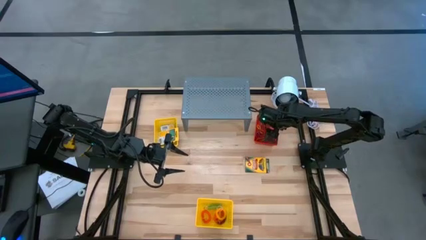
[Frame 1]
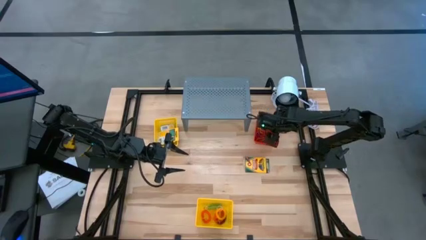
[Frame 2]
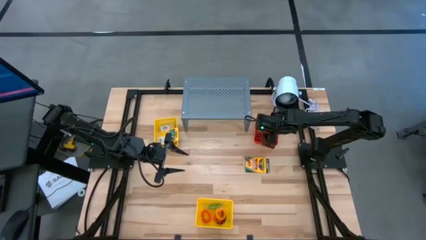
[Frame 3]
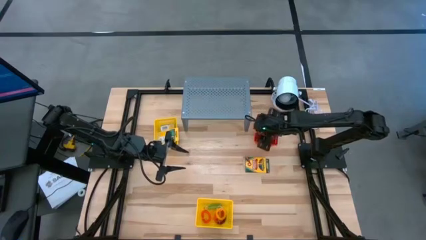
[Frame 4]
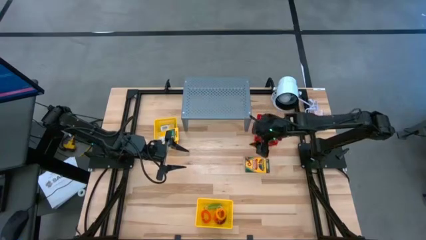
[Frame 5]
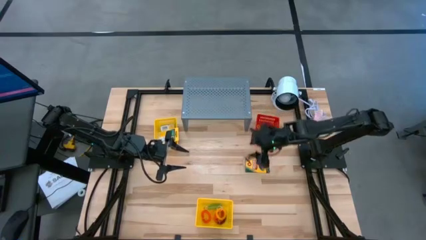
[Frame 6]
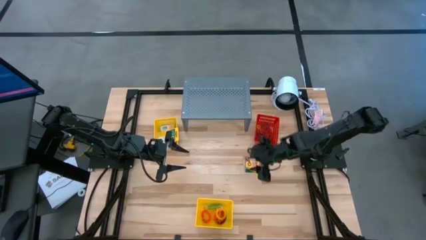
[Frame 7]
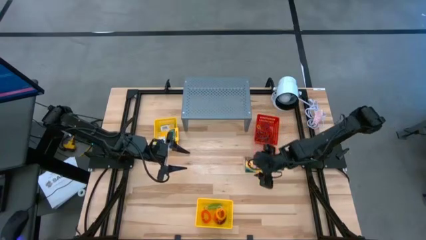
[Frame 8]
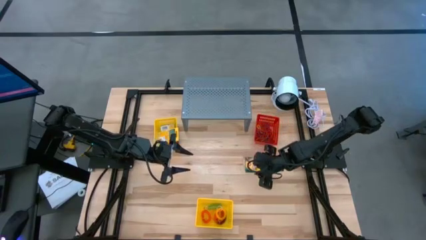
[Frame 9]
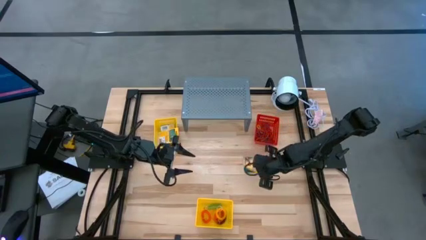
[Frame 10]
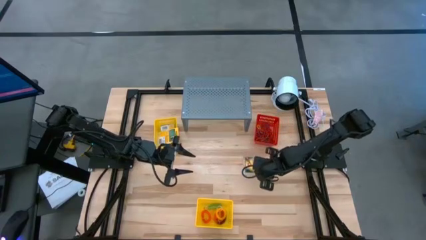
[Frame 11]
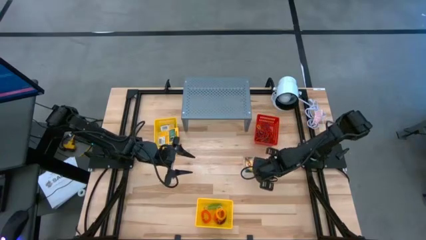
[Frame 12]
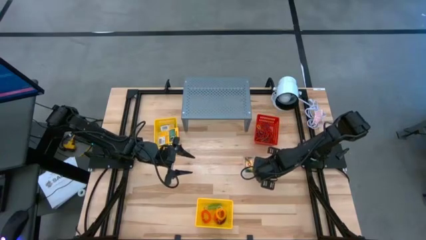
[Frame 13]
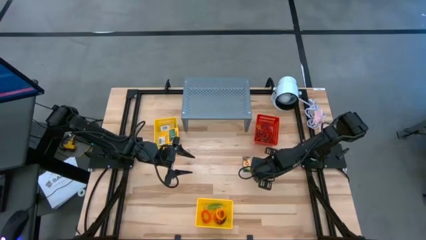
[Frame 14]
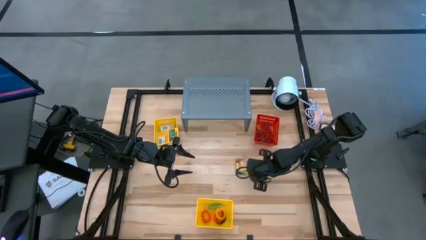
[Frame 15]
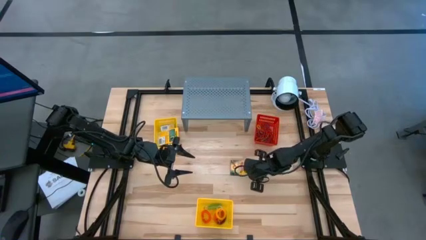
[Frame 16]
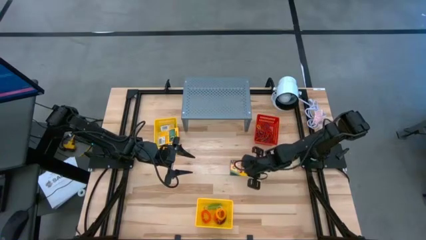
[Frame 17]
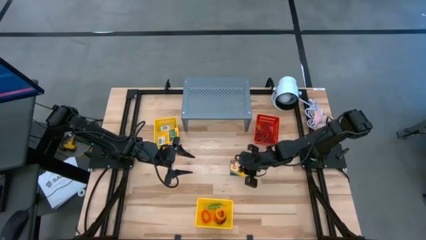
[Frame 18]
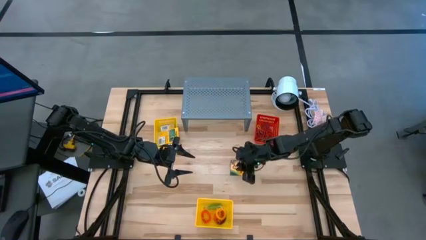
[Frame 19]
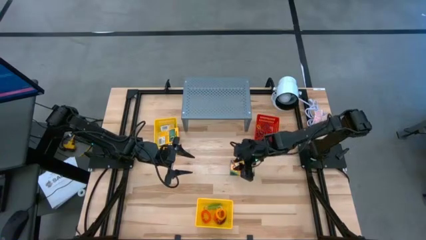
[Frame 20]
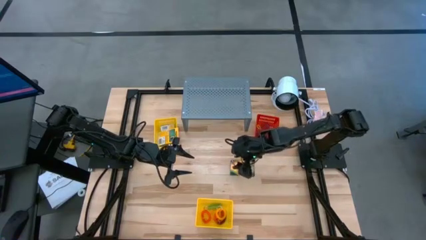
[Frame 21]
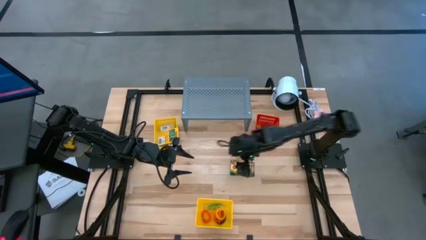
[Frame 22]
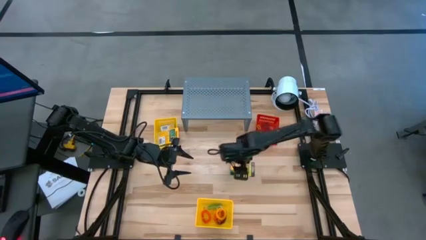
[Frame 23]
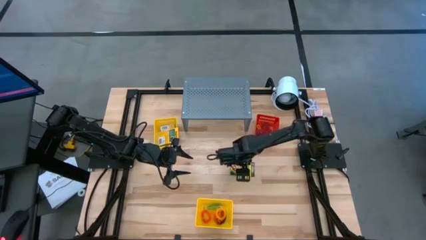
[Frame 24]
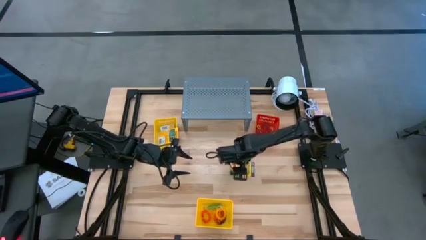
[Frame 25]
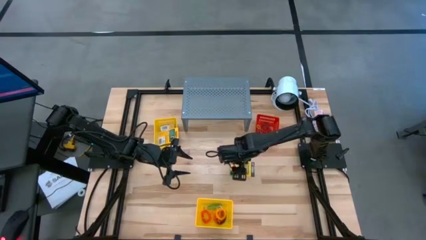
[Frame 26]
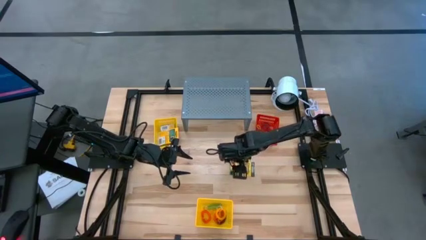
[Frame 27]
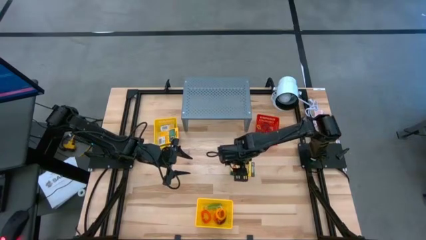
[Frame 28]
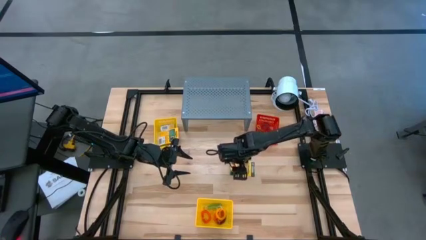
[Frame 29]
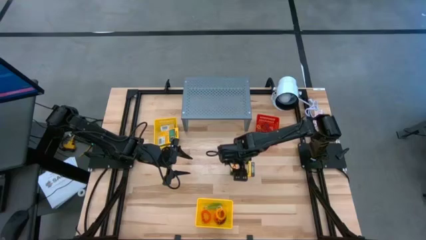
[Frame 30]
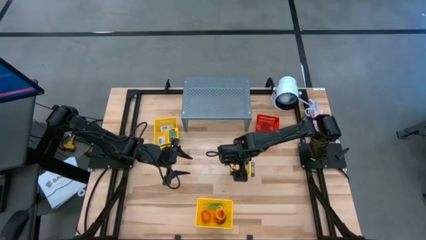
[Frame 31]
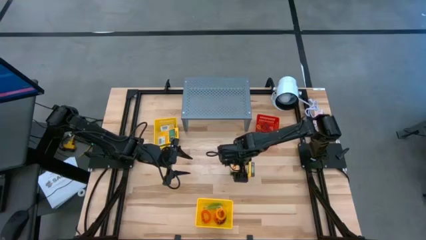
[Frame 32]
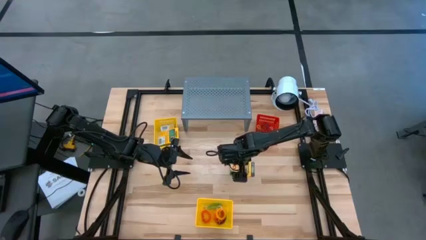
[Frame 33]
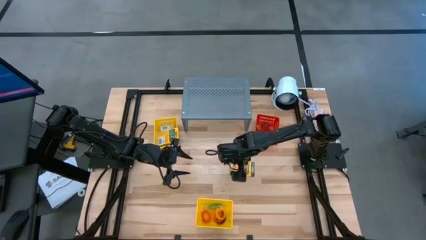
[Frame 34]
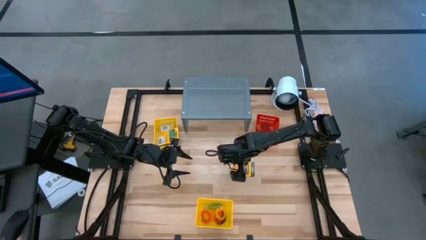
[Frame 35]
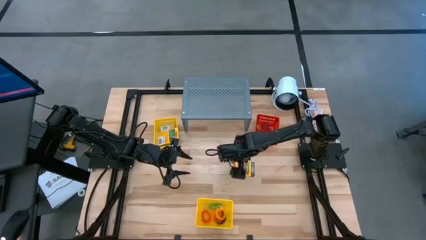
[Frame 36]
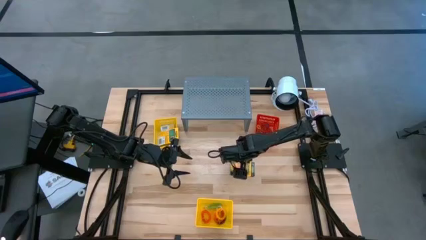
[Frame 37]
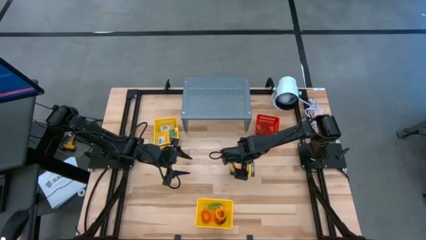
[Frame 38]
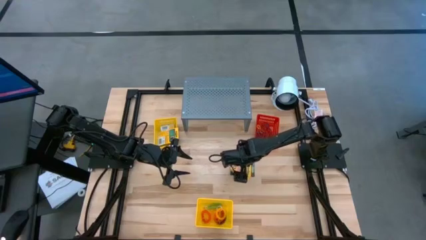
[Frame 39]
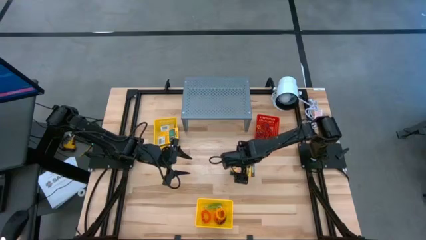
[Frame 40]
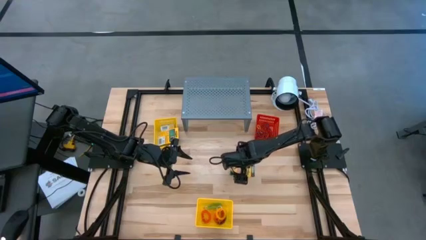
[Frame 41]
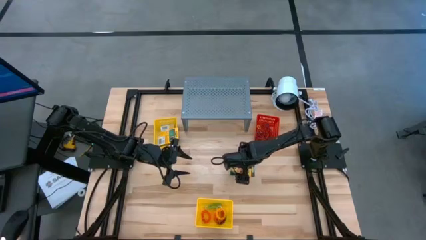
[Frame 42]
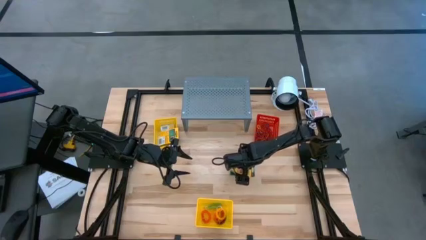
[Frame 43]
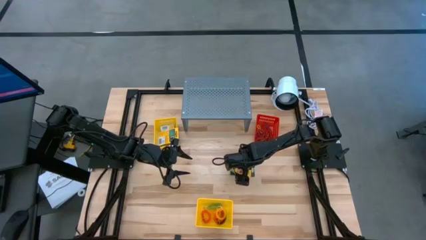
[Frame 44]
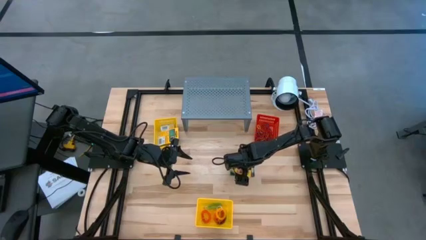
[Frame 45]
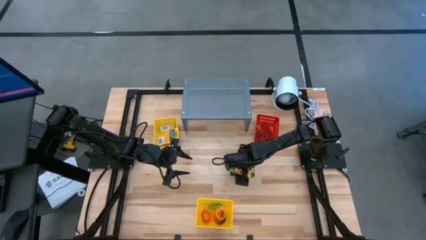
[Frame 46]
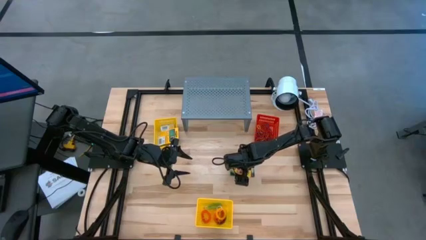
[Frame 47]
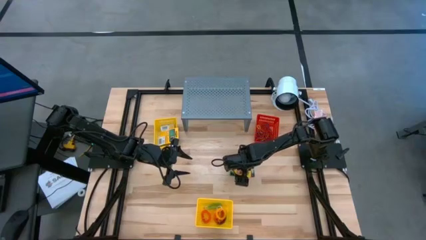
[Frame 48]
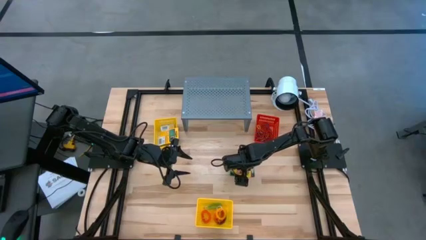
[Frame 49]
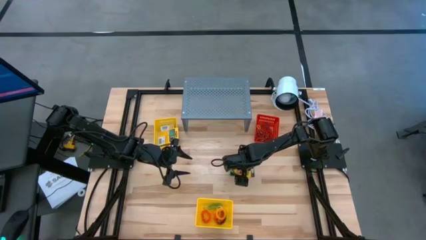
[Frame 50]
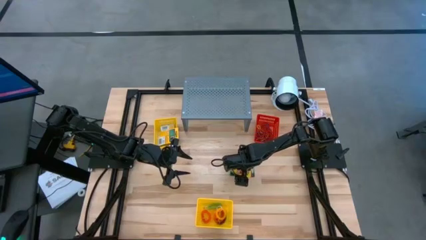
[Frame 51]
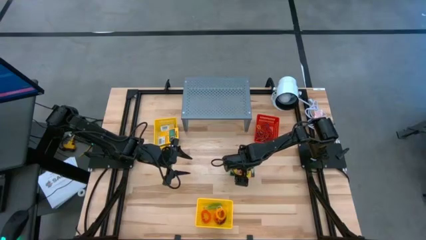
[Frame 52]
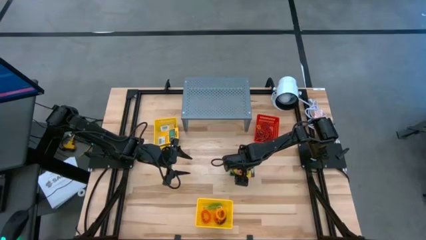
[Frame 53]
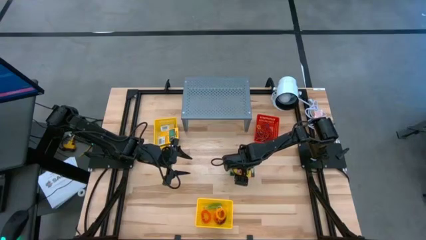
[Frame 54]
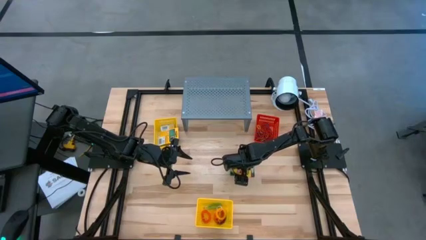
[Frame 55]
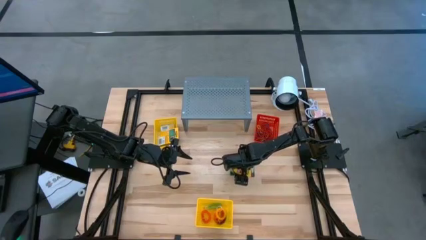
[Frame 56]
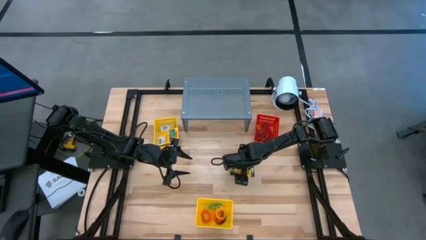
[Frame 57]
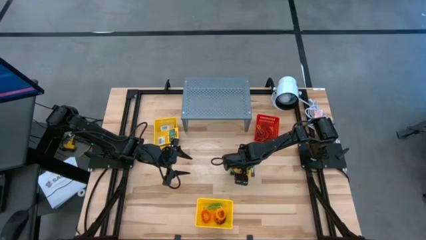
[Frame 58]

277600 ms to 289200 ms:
Task: Pick & Place Office Desk Supplies
Put the yellow crayon box into the top yellow bin
